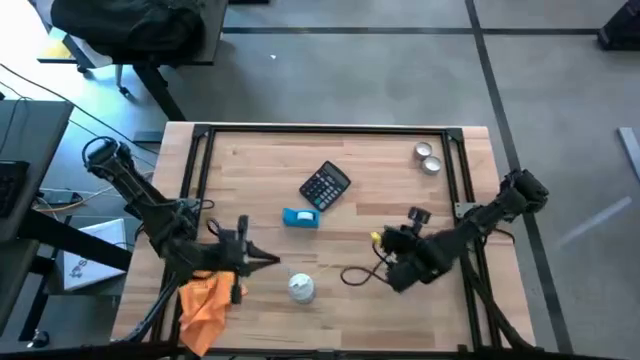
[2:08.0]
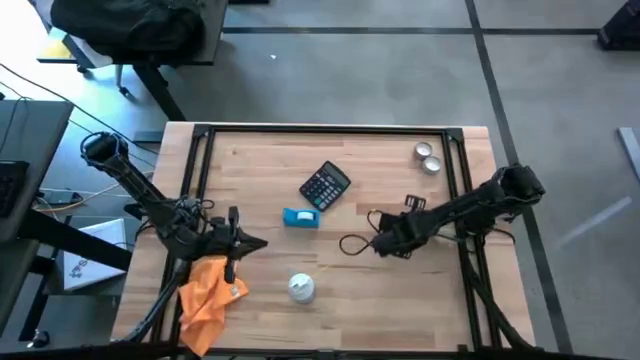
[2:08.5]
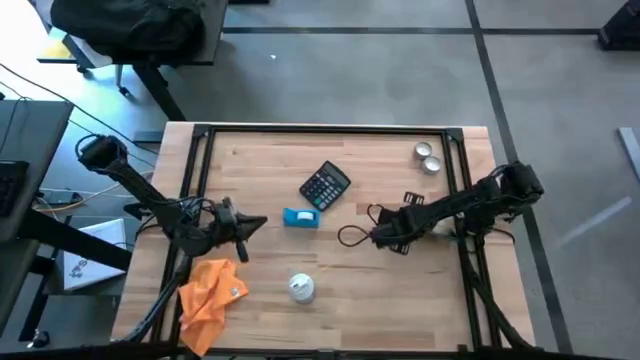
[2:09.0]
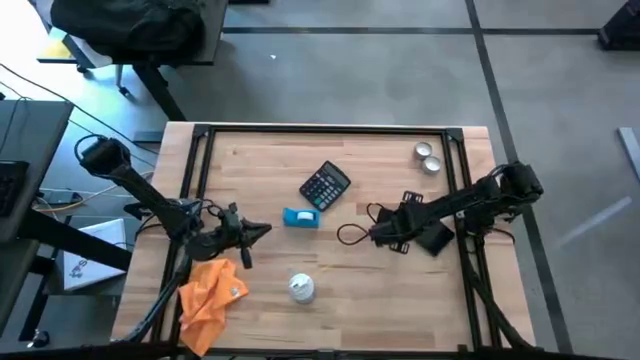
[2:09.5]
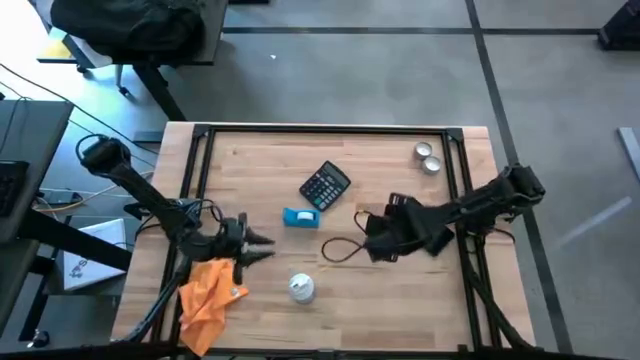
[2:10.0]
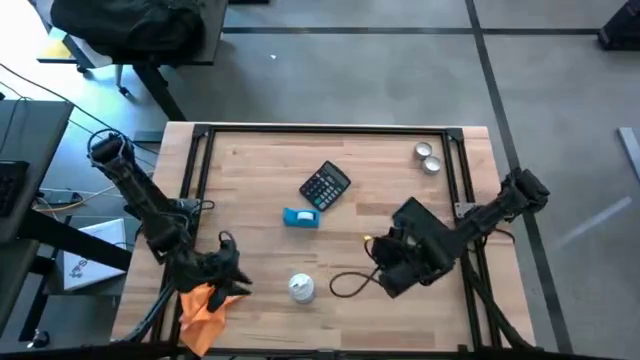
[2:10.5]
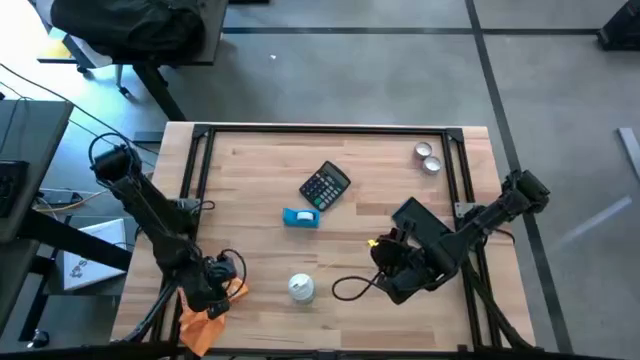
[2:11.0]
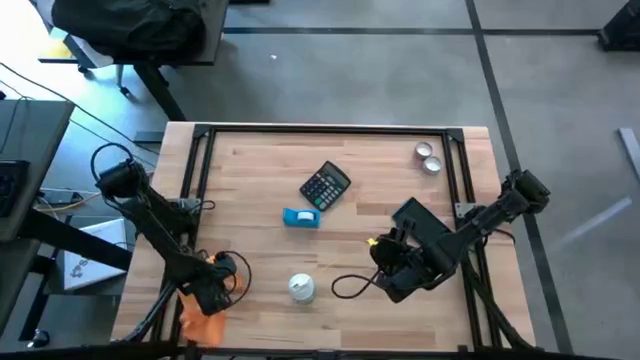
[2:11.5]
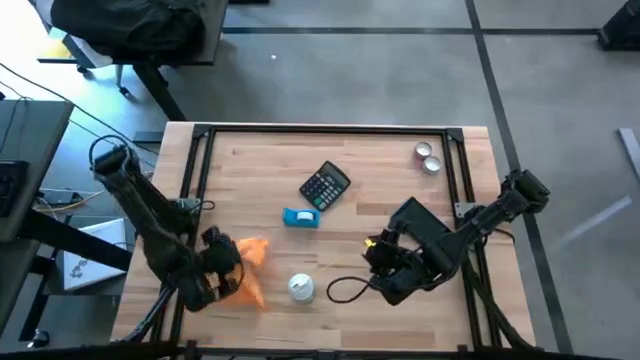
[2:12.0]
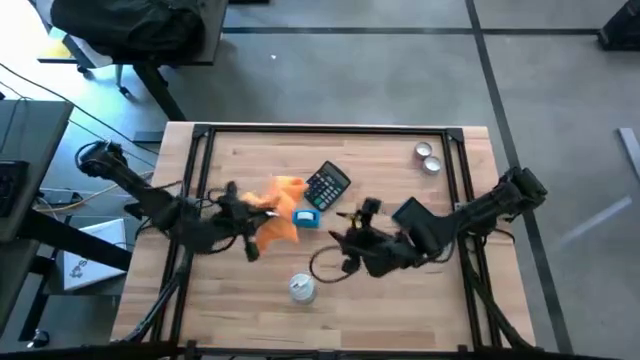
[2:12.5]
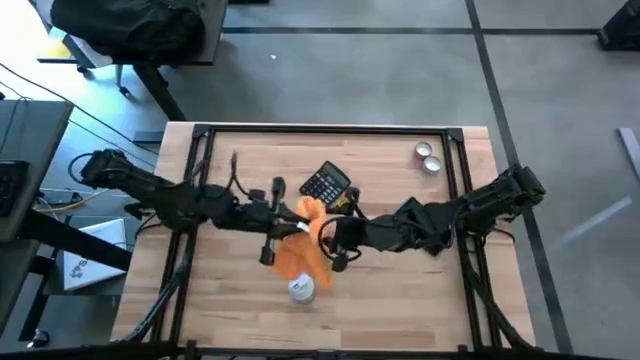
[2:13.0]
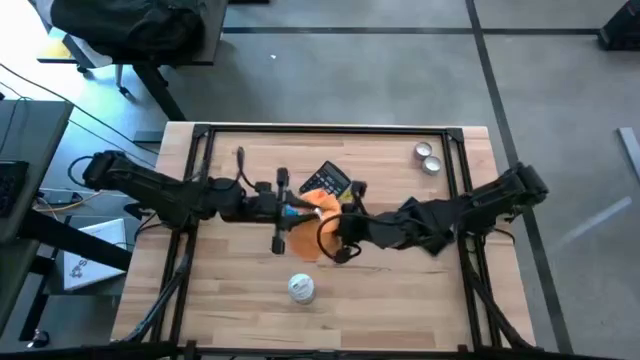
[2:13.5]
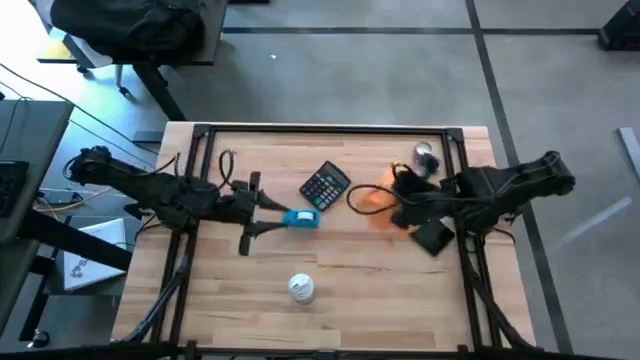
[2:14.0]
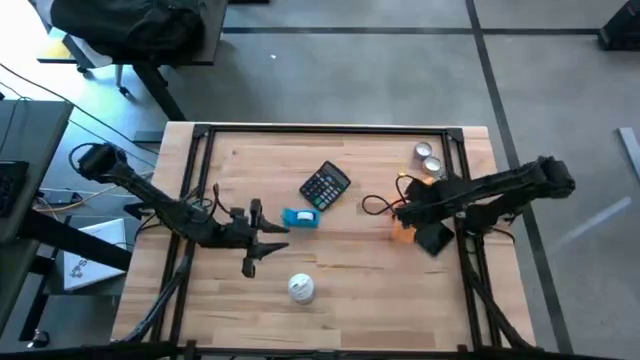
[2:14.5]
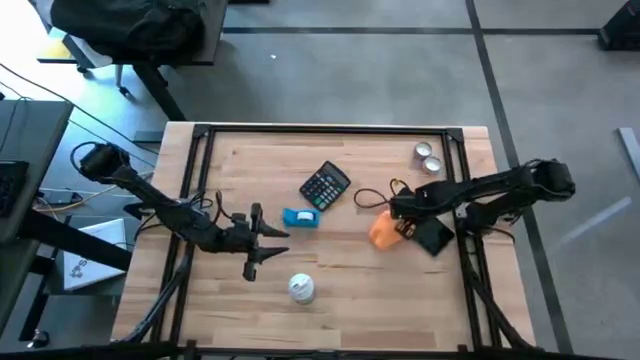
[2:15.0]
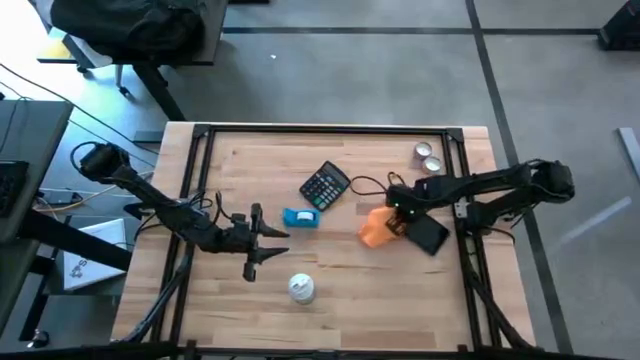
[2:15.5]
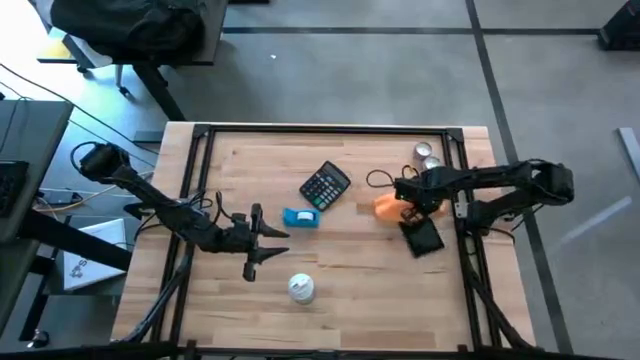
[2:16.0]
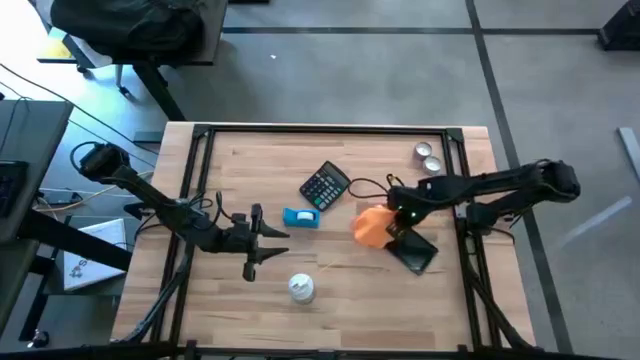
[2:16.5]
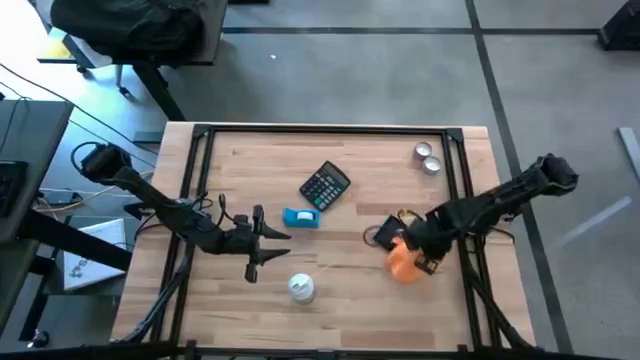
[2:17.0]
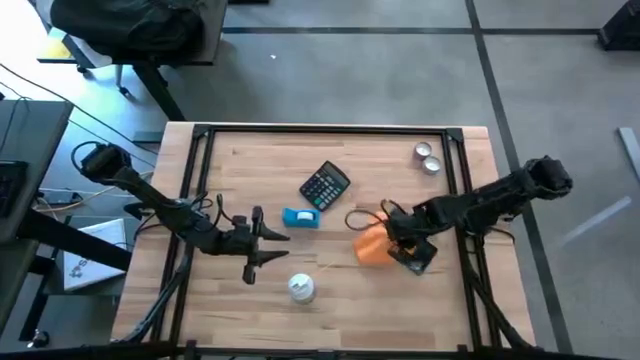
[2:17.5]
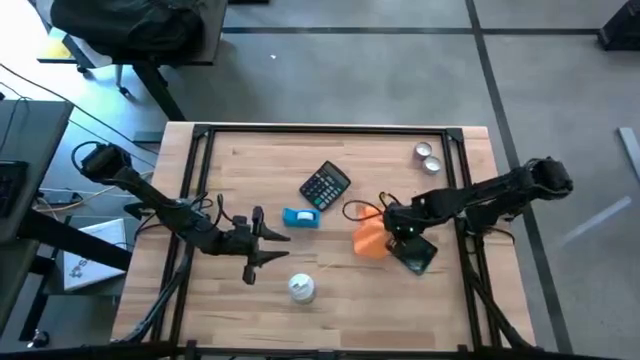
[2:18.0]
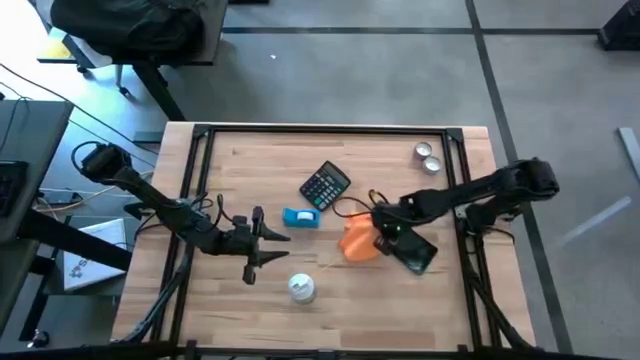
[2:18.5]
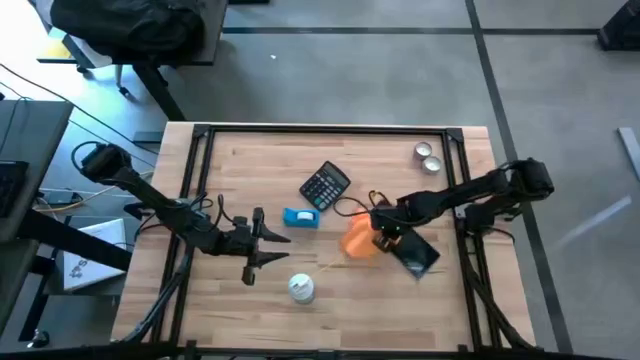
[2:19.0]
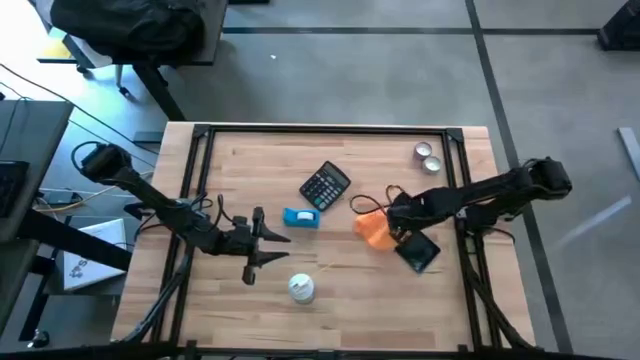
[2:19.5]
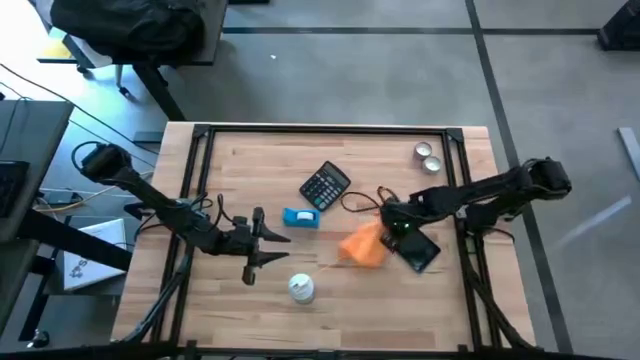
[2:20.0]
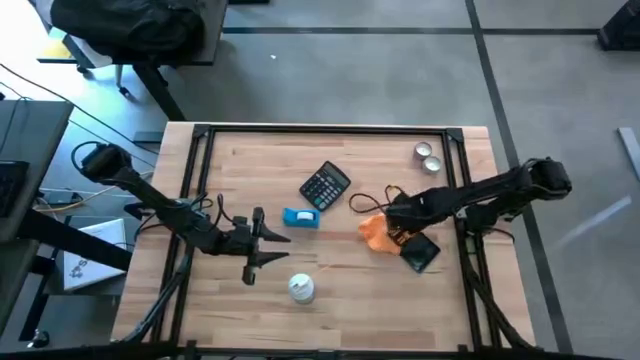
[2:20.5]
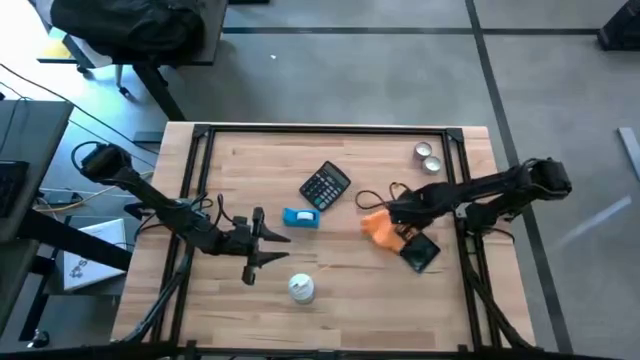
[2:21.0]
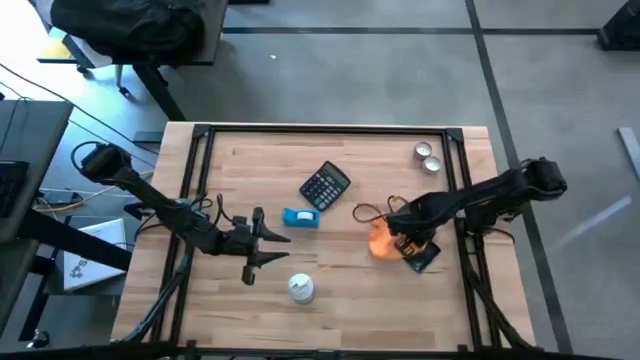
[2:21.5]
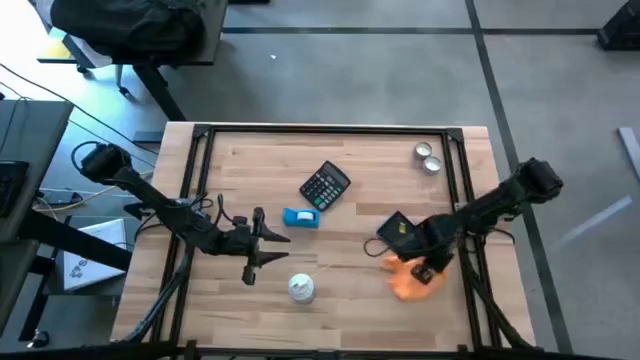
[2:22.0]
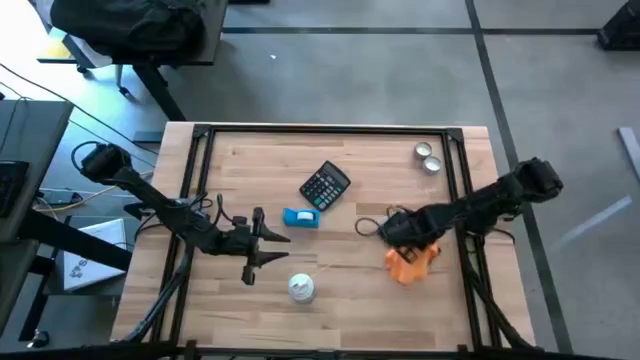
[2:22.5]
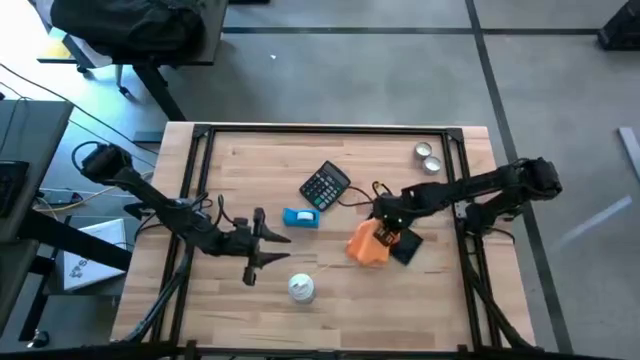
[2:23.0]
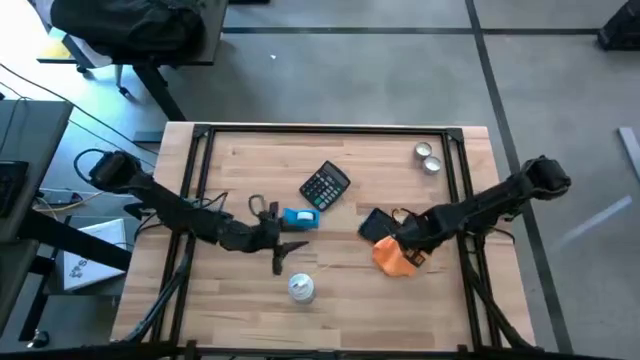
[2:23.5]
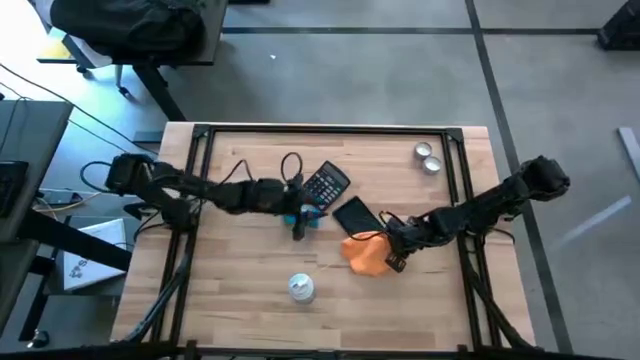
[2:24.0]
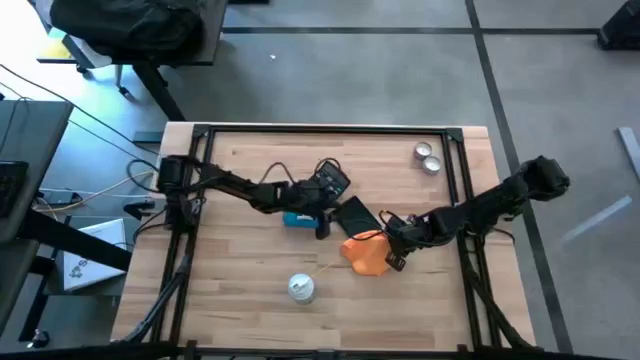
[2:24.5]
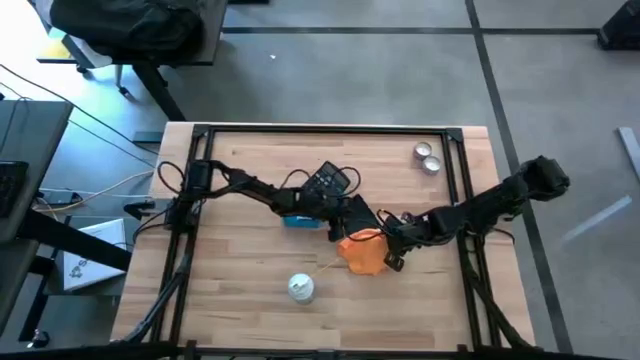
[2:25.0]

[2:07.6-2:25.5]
Task: Apply microfiber cloth
Wipe the front of the cellphone using microfiber cloth

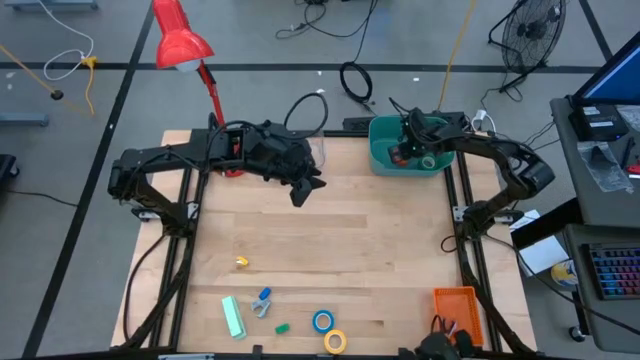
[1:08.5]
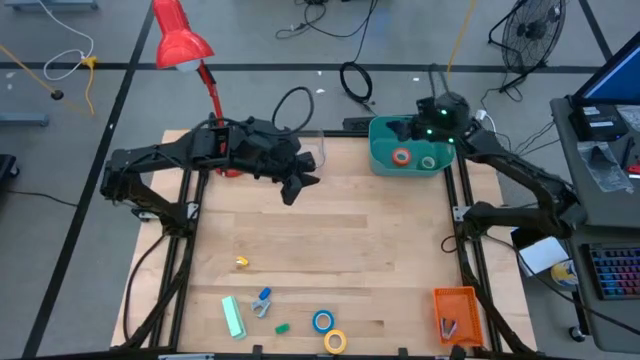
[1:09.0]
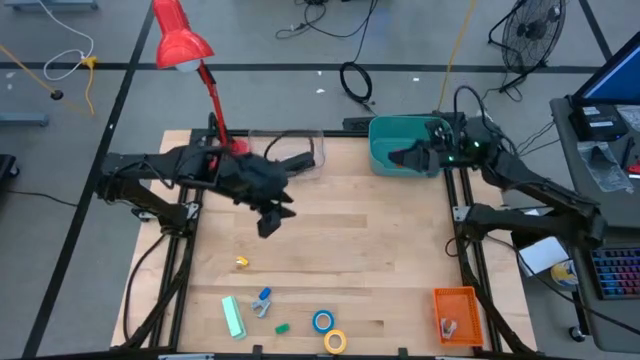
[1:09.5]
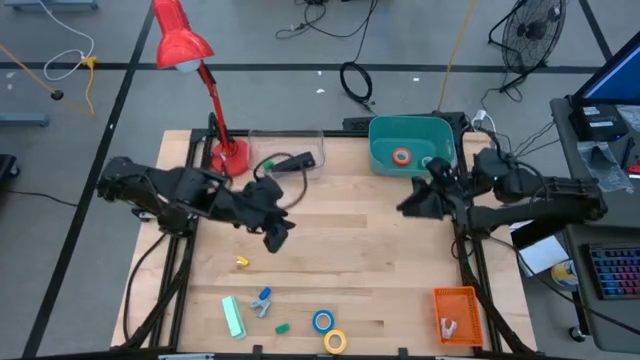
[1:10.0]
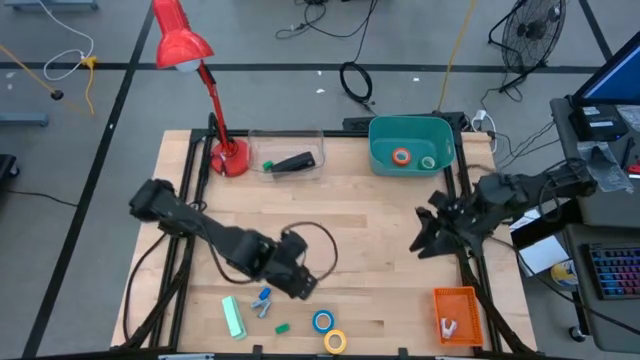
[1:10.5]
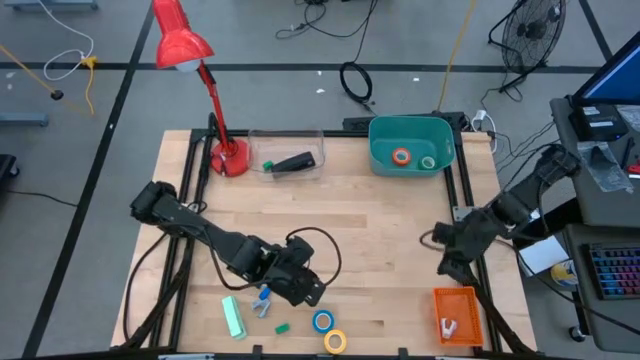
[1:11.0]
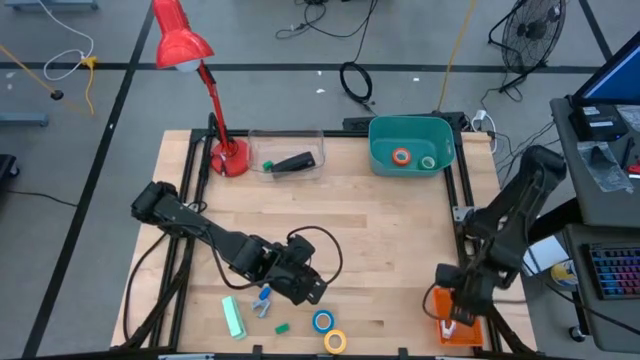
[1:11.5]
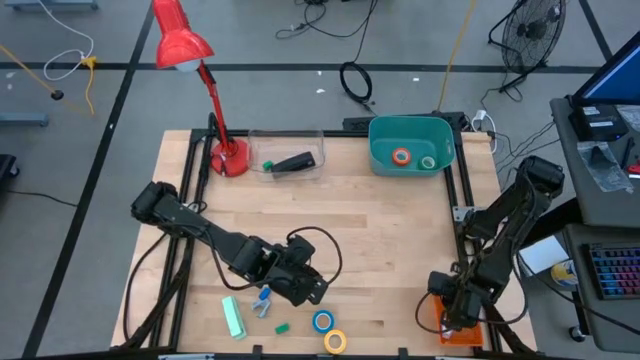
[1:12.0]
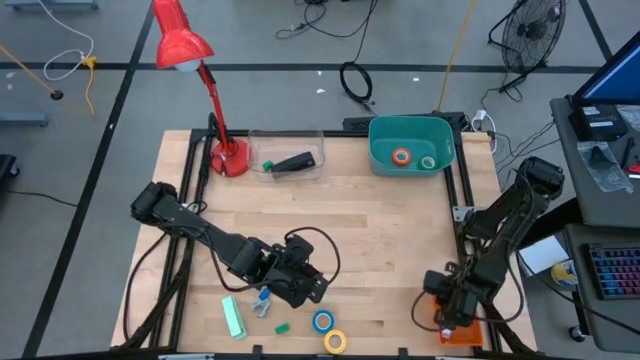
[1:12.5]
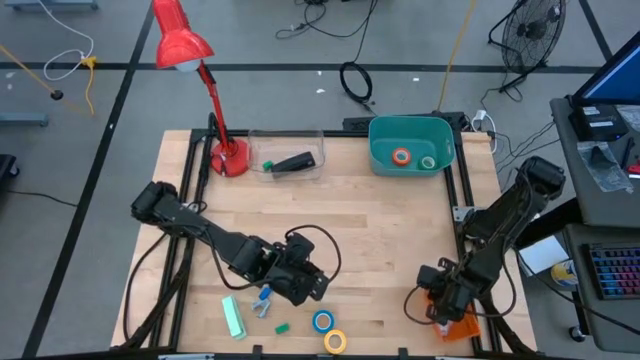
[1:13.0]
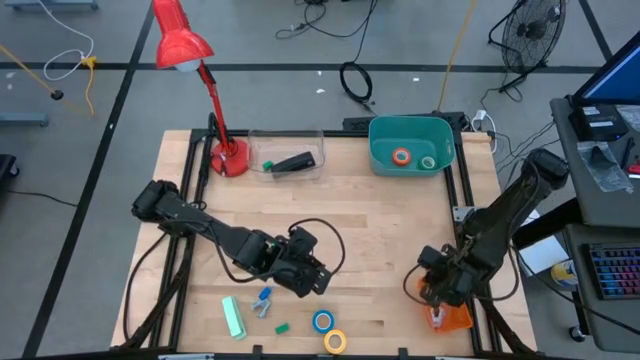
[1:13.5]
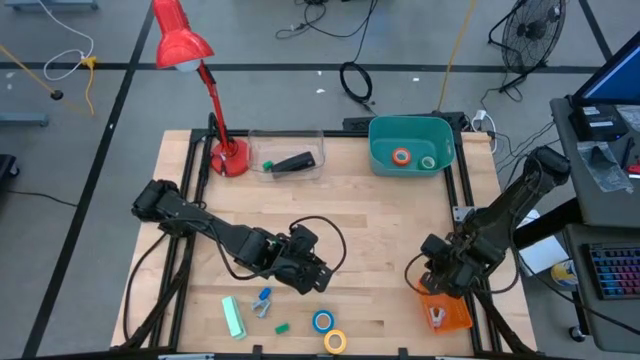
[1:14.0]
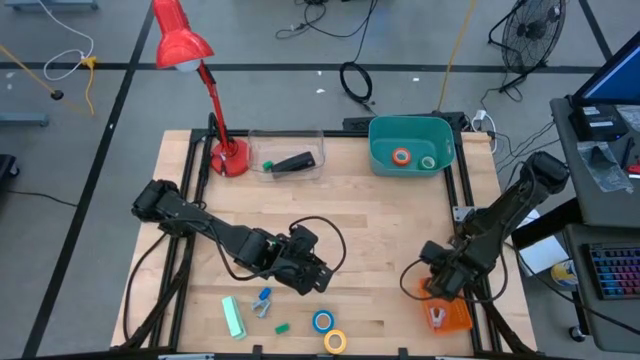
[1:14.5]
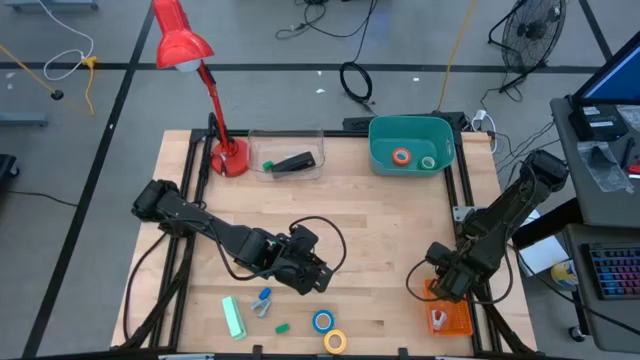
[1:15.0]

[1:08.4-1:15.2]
Task: Pick and place Stapler, Stapler remover, tape
Adjust the orange bin
